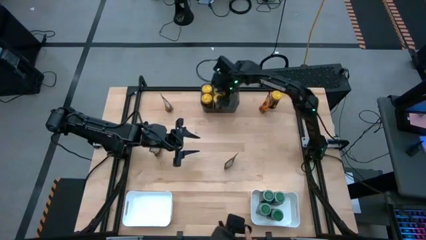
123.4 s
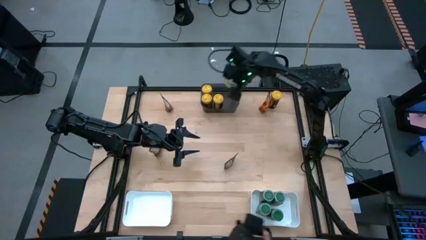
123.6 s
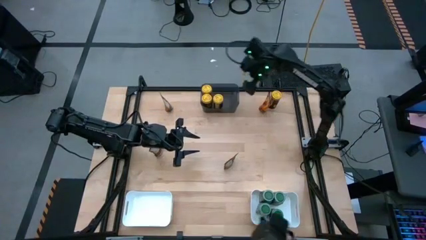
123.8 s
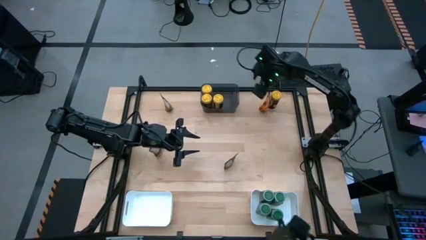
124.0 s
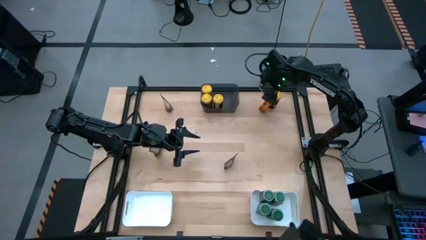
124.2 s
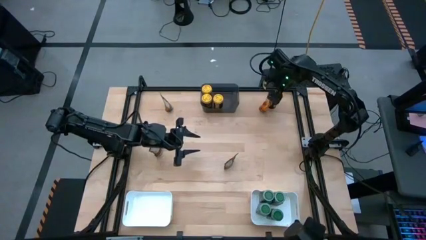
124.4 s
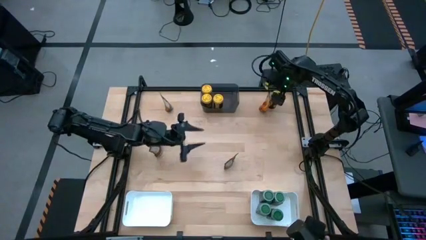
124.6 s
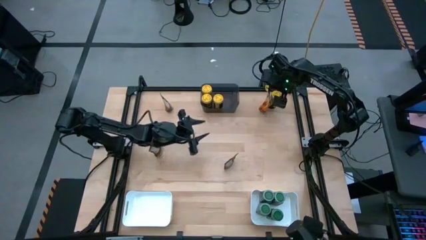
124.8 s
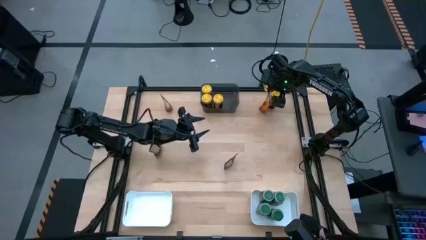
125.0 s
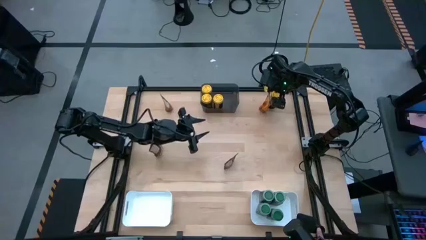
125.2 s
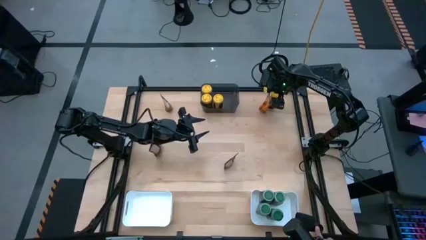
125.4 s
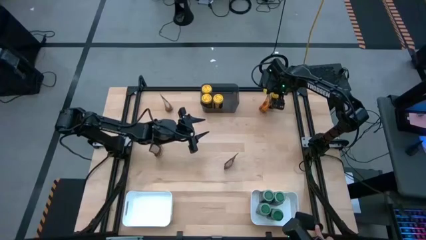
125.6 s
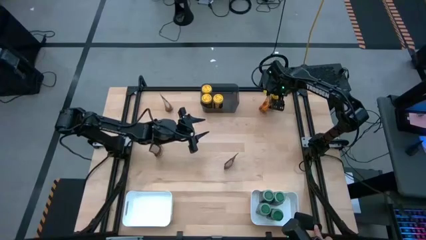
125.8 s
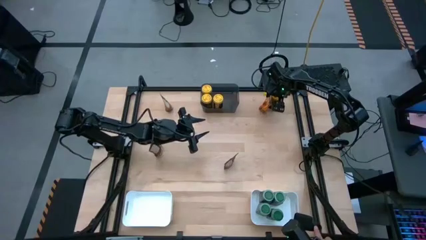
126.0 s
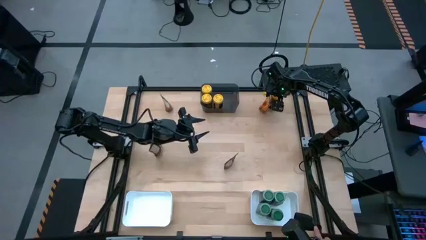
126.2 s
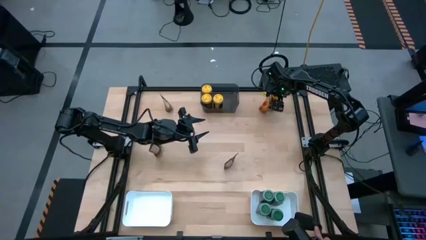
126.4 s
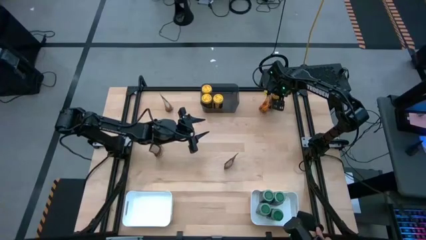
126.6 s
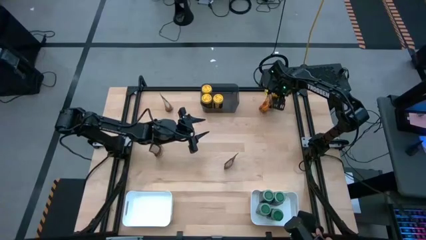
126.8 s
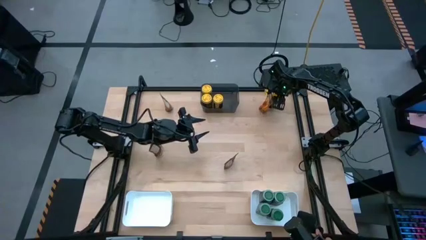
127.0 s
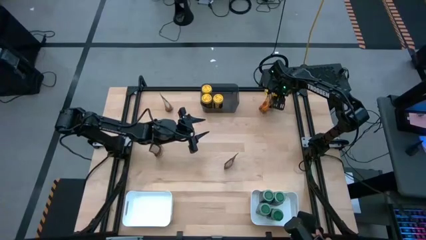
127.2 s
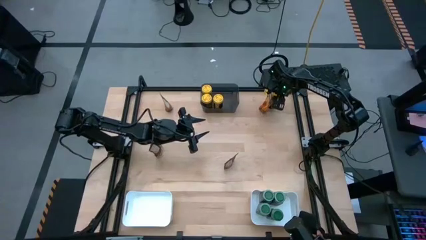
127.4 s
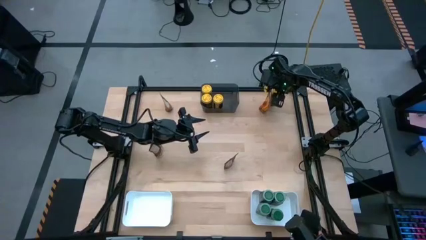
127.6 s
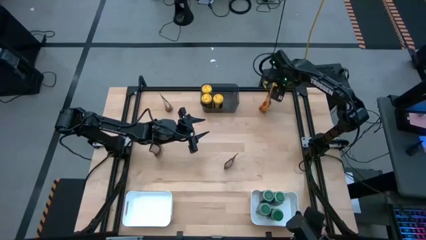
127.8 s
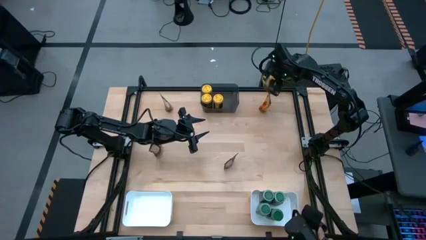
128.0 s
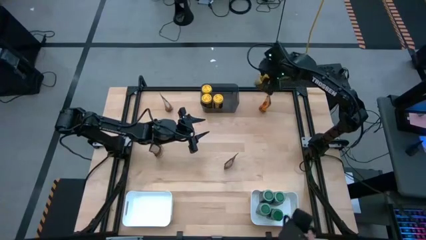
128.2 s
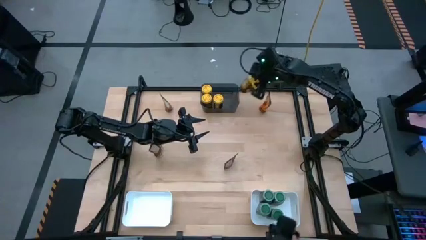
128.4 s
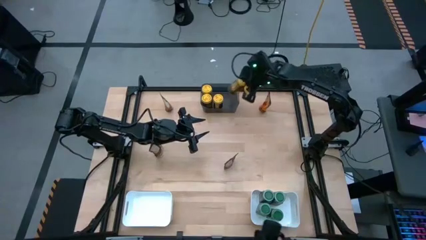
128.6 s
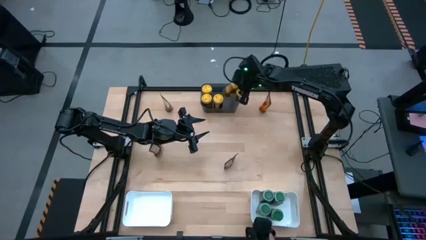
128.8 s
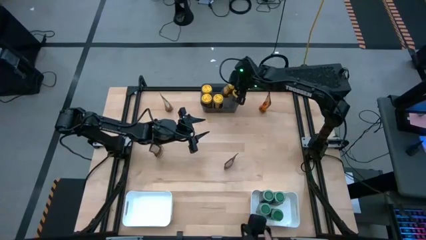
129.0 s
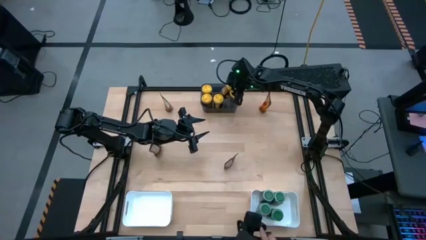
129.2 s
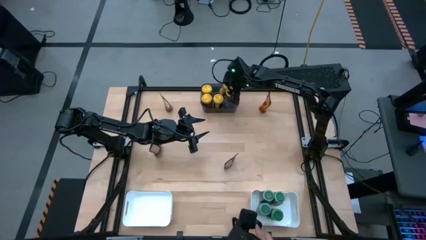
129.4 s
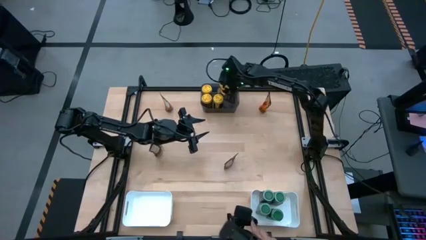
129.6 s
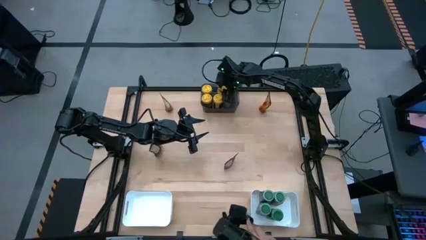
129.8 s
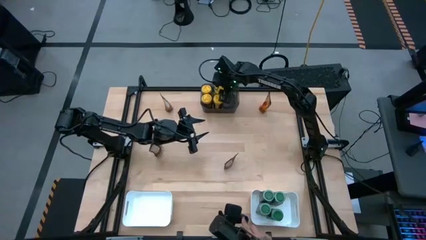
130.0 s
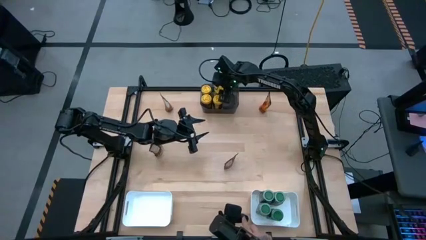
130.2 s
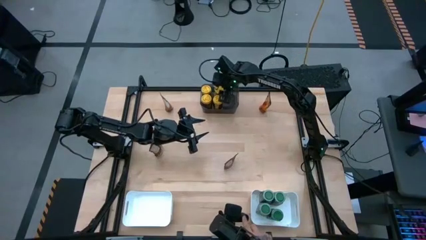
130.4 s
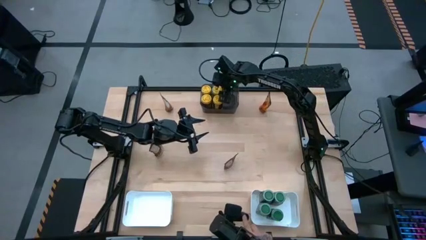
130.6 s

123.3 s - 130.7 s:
Task: Sort spices by type
Put the yellow seasoning bottle into the gray bin

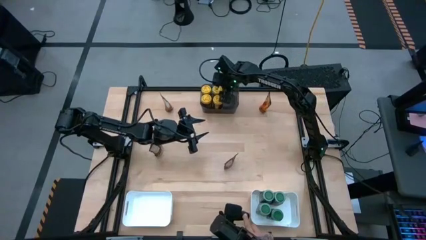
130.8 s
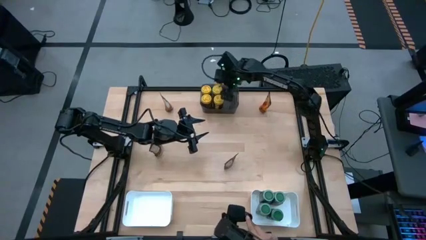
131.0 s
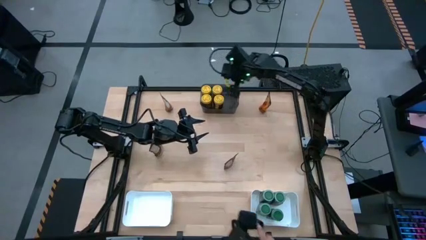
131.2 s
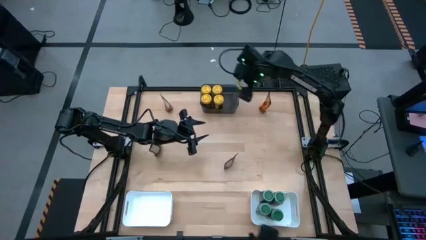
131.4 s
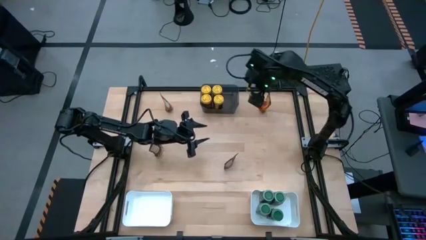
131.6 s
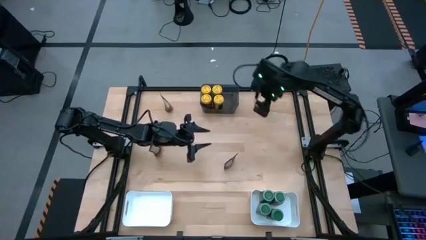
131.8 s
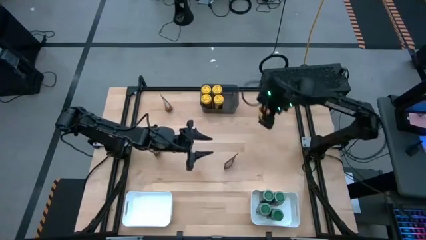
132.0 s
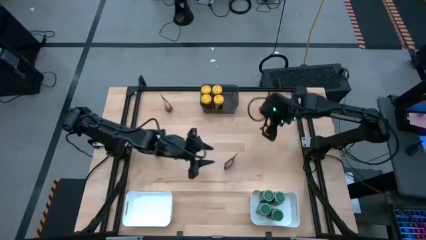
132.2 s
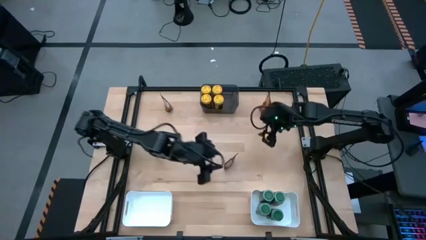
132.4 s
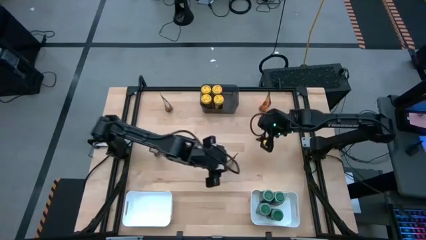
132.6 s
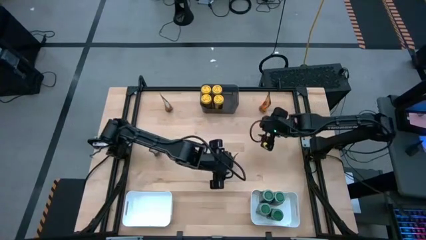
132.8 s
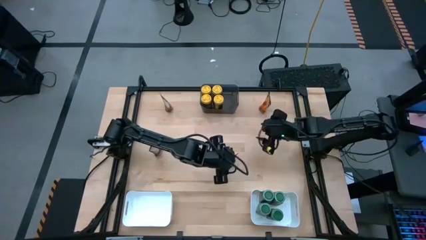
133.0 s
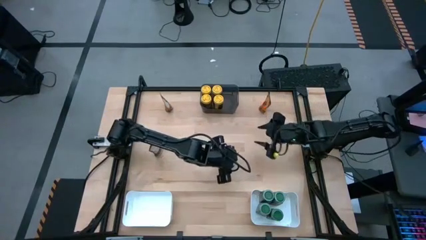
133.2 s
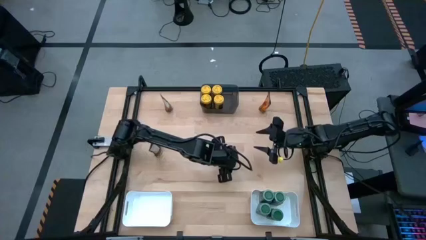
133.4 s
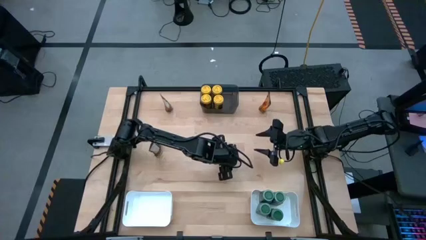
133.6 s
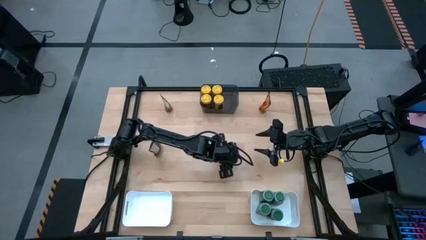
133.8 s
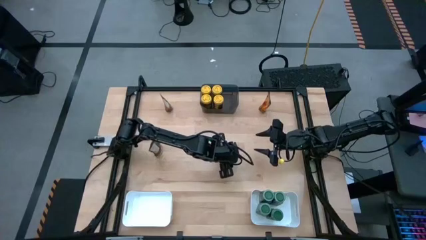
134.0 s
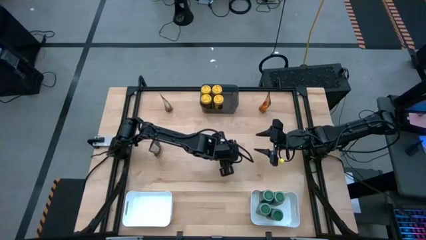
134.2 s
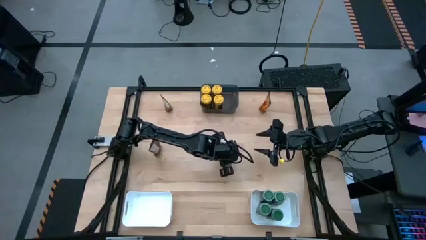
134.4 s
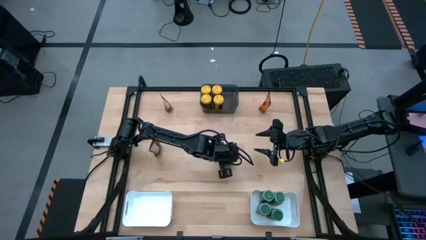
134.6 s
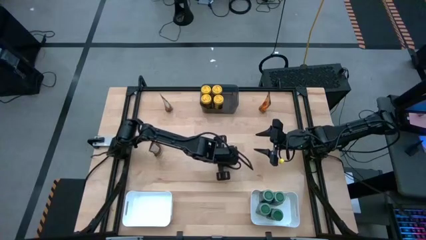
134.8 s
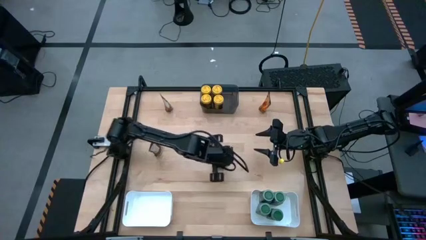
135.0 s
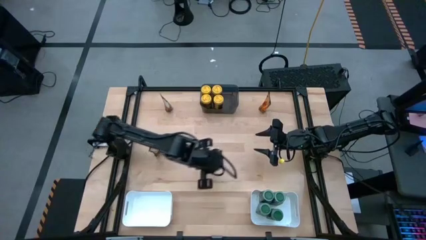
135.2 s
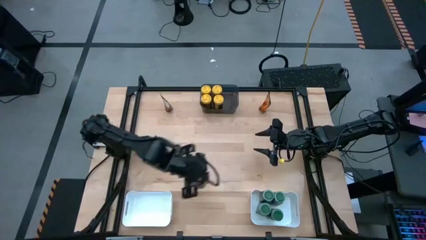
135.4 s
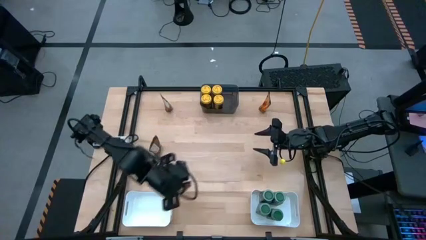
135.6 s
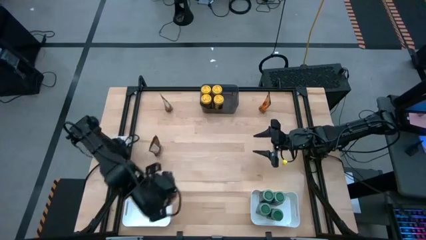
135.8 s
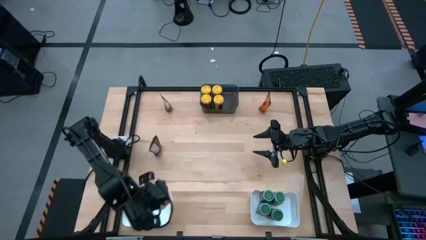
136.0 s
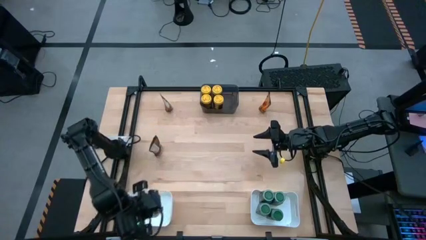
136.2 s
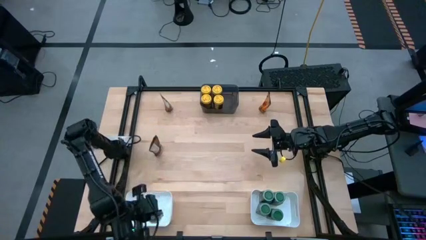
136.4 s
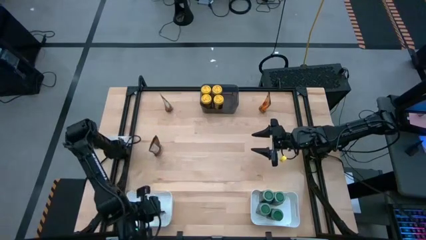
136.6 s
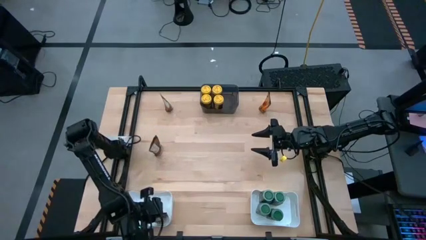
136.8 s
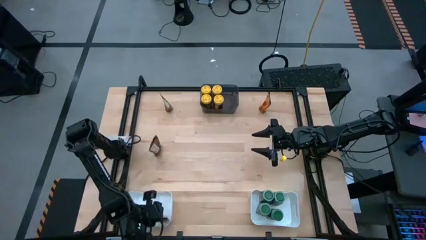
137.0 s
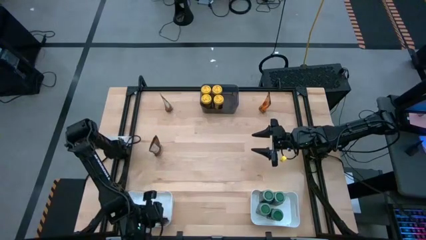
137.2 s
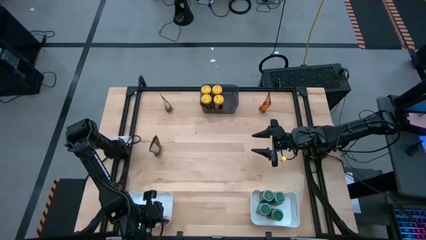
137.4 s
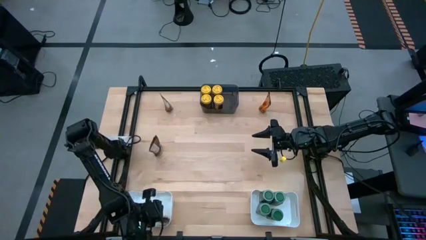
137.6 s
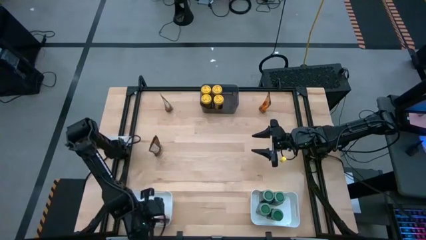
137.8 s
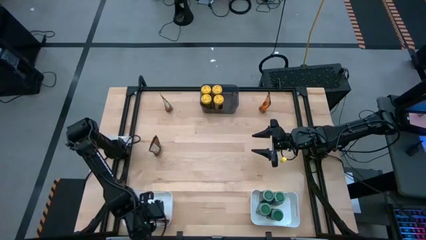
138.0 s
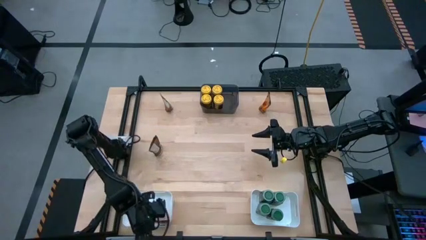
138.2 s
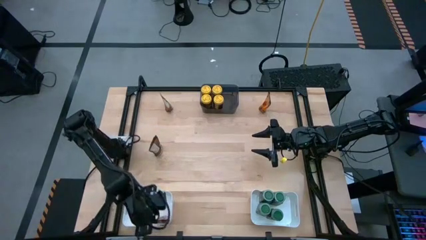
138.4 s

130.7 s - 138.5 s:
Put the bottom right orange seasoning pack into the left white bin

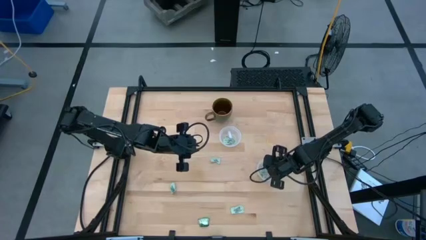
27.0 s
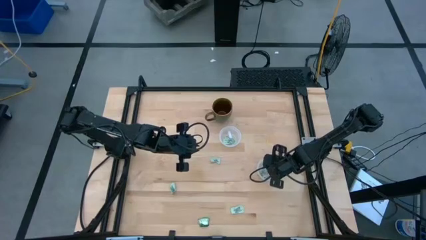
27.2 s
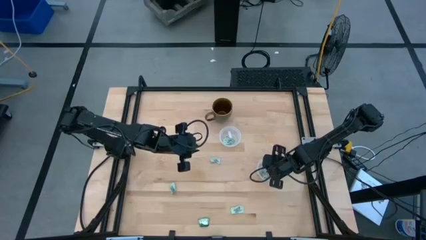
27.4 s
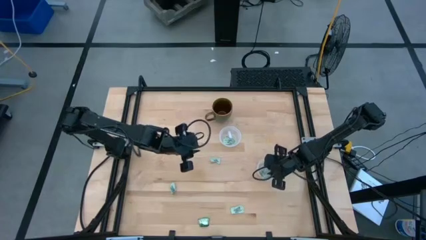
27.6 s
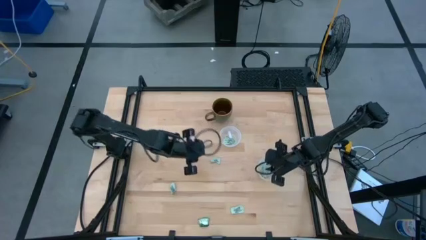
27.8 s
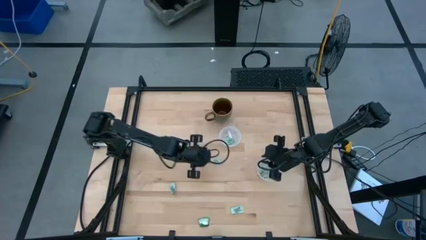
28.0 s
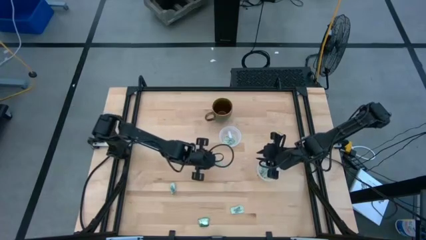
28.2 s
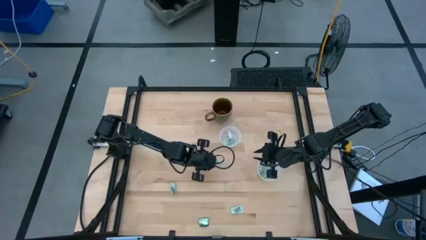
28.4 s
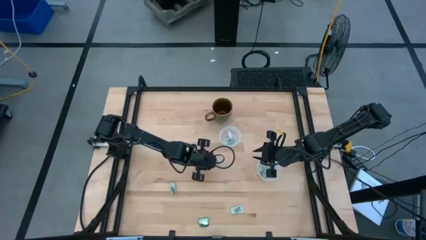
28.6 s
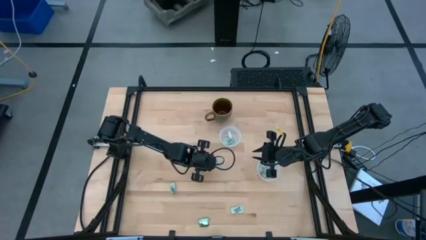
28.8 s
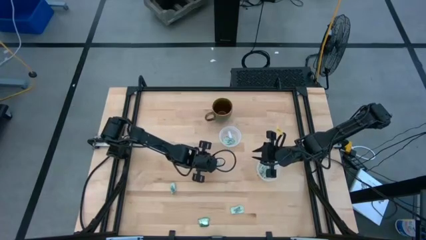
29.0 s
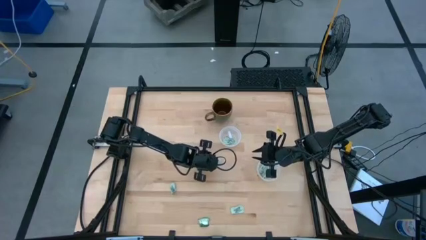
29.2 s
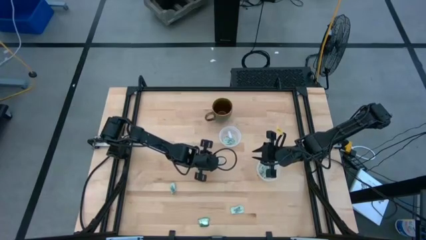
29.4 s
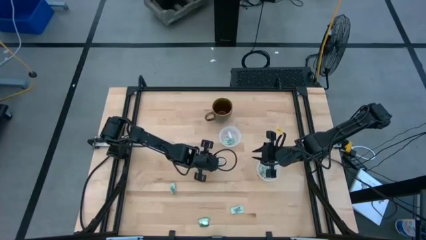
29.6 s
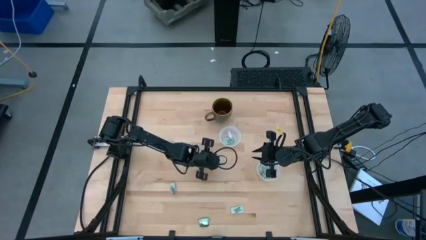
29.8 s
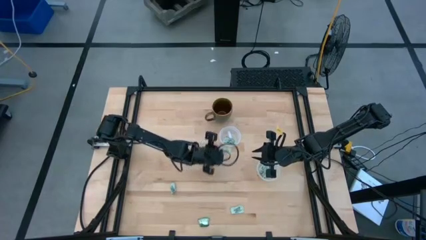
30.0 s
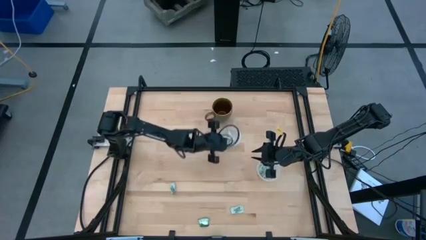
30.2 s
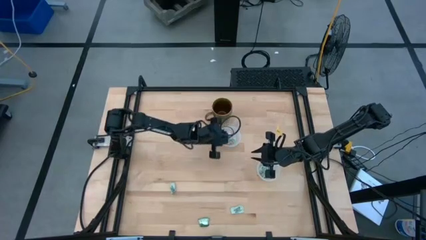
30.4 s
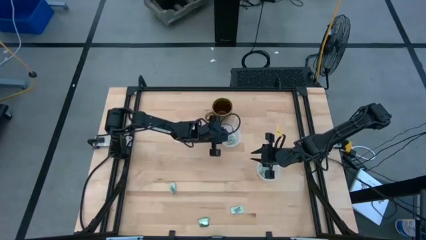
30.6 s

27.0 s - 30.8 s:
Task: Pick and place items into bin
Put the stevia packet into the top transparent bin
